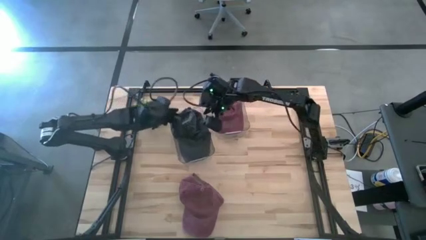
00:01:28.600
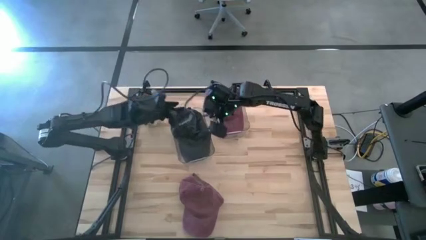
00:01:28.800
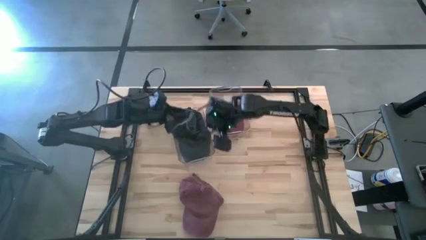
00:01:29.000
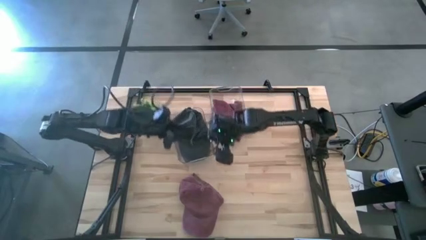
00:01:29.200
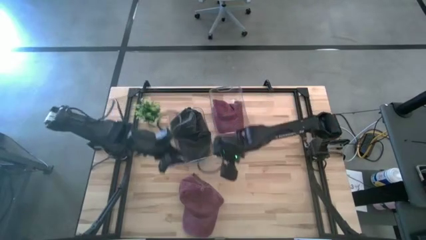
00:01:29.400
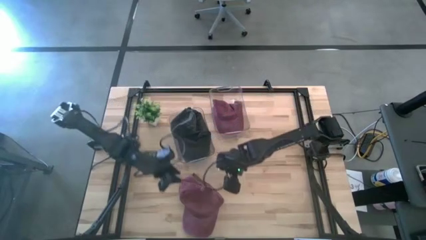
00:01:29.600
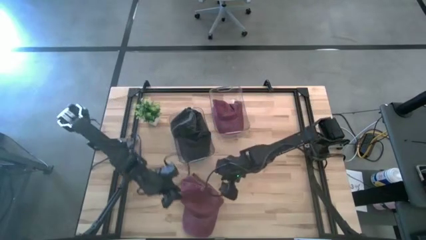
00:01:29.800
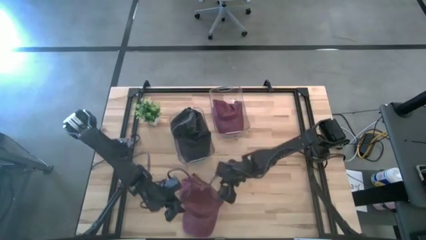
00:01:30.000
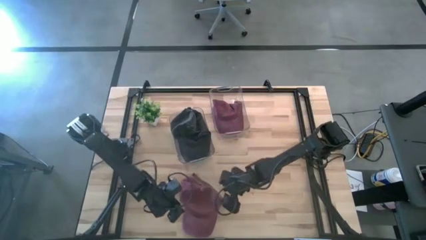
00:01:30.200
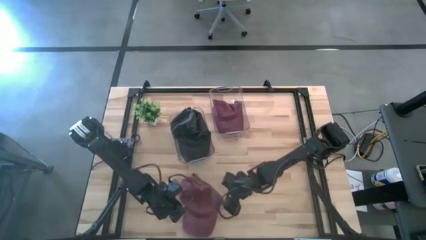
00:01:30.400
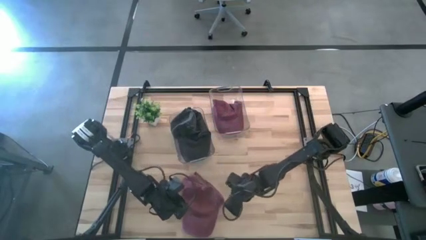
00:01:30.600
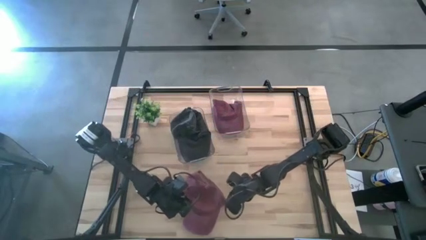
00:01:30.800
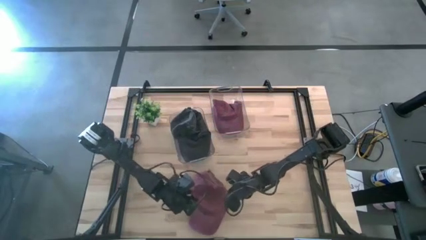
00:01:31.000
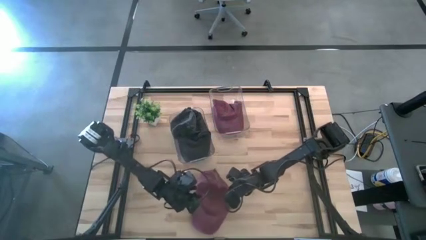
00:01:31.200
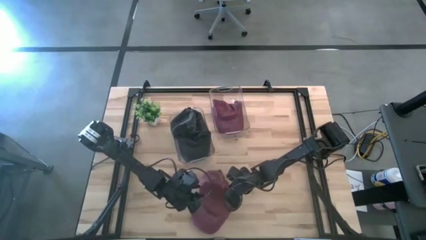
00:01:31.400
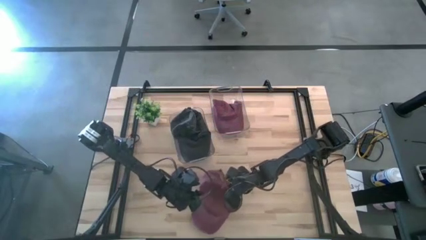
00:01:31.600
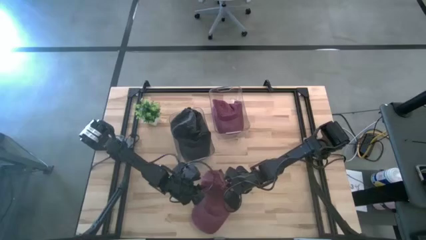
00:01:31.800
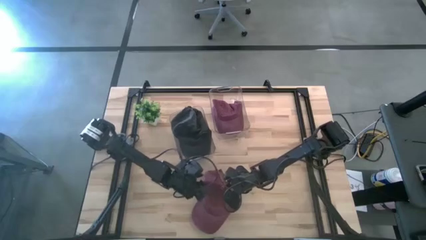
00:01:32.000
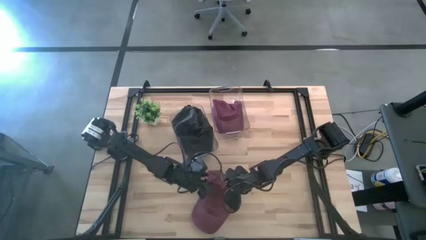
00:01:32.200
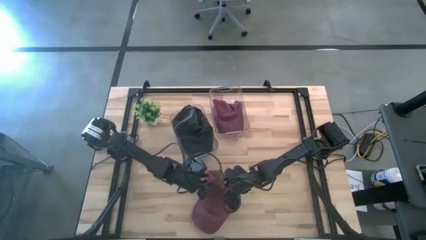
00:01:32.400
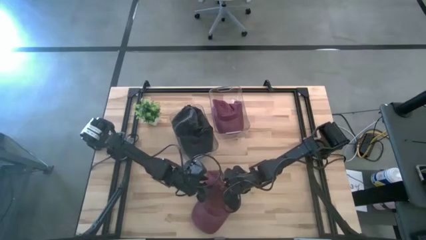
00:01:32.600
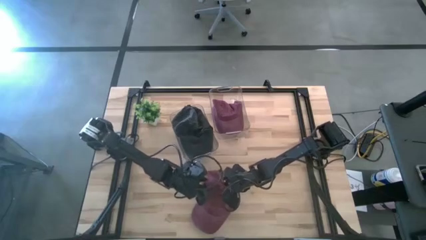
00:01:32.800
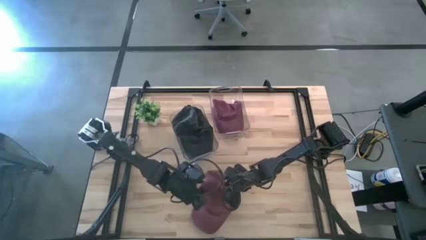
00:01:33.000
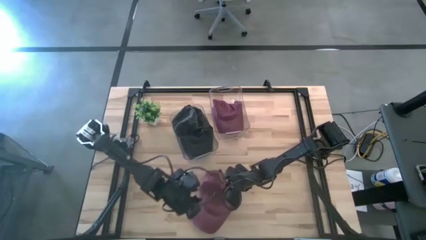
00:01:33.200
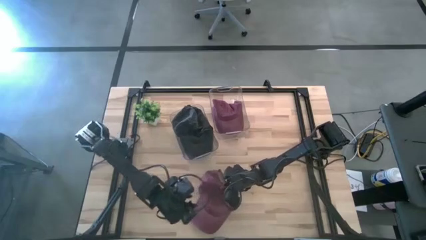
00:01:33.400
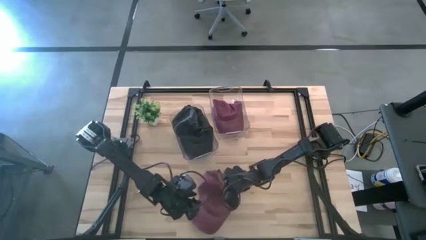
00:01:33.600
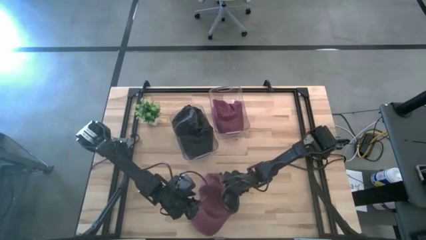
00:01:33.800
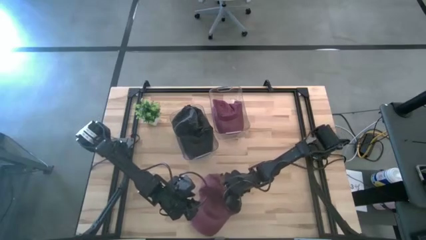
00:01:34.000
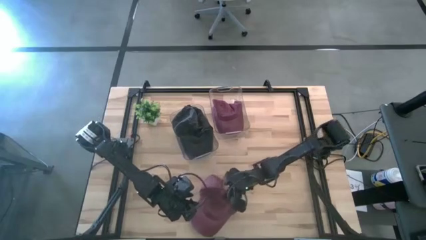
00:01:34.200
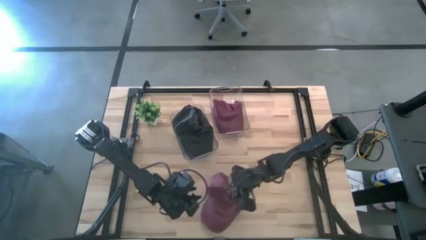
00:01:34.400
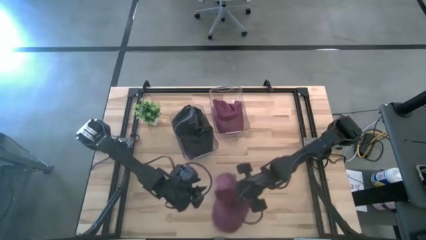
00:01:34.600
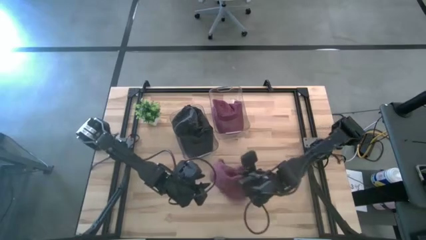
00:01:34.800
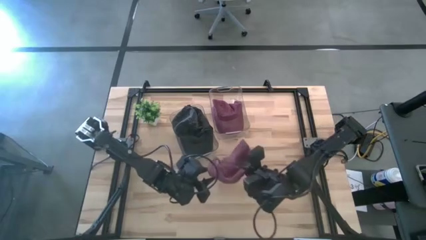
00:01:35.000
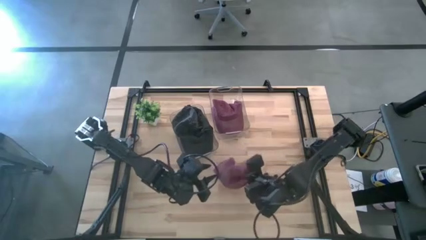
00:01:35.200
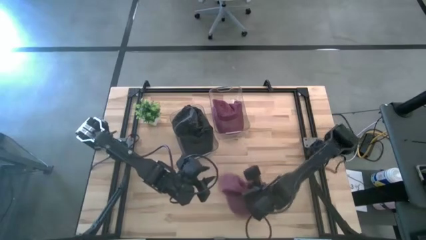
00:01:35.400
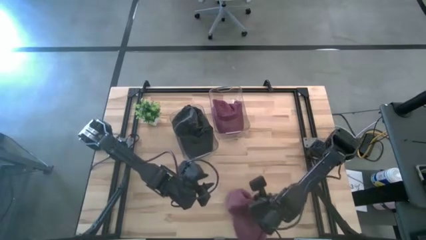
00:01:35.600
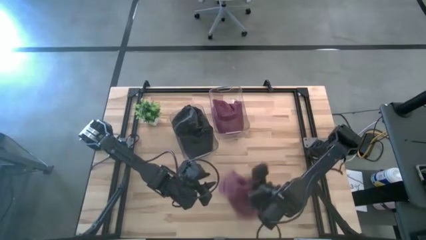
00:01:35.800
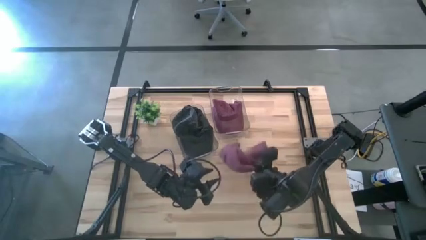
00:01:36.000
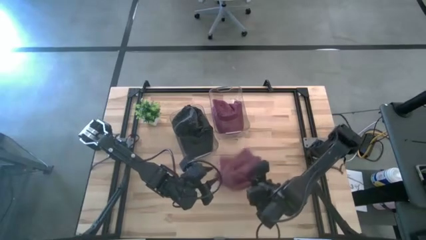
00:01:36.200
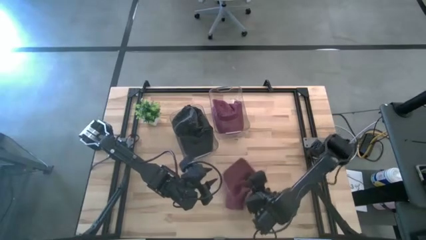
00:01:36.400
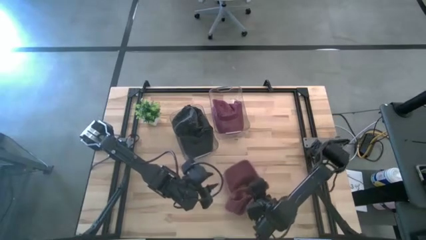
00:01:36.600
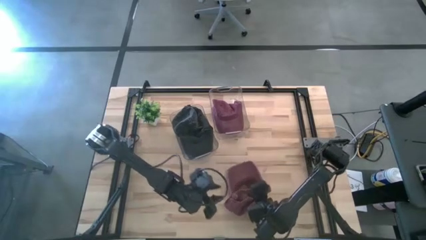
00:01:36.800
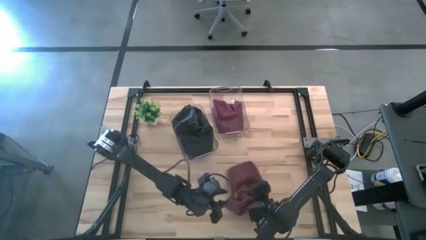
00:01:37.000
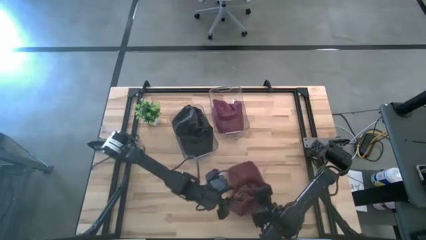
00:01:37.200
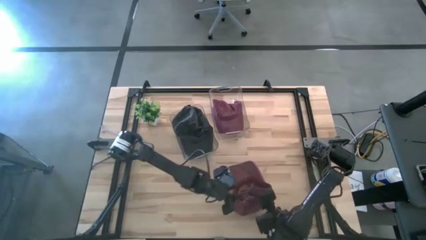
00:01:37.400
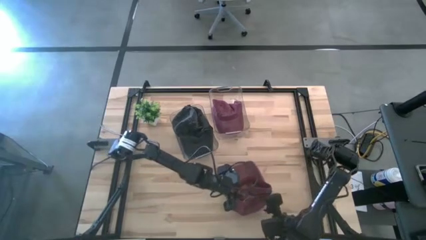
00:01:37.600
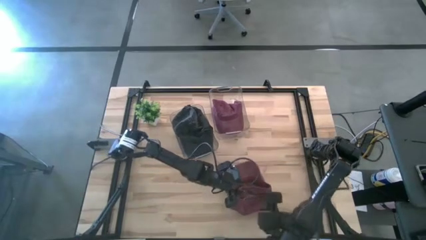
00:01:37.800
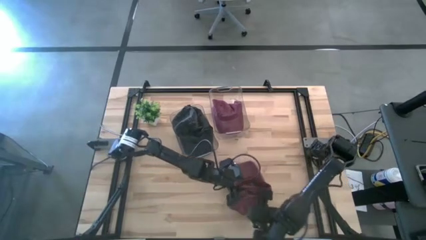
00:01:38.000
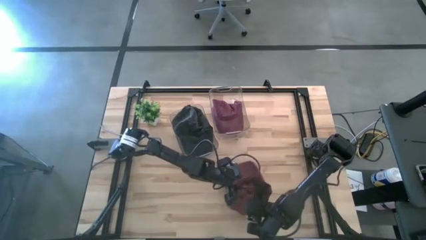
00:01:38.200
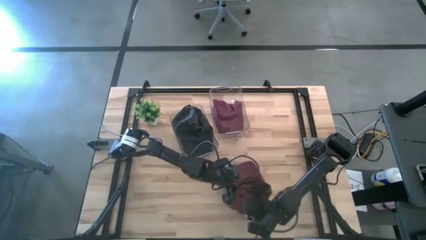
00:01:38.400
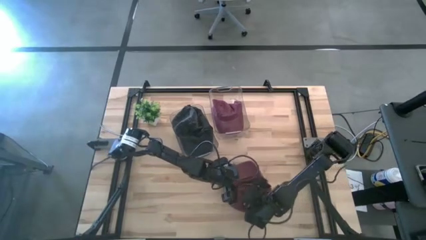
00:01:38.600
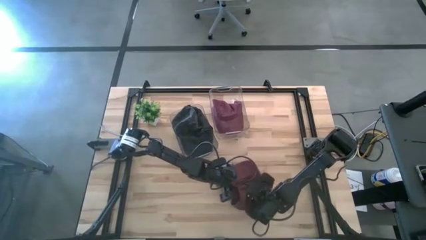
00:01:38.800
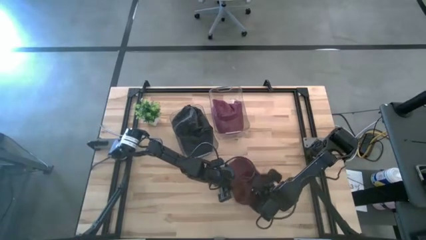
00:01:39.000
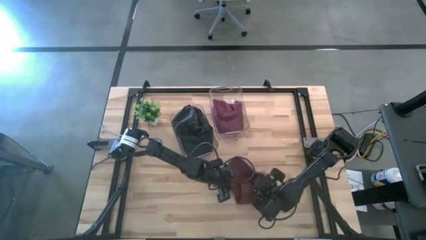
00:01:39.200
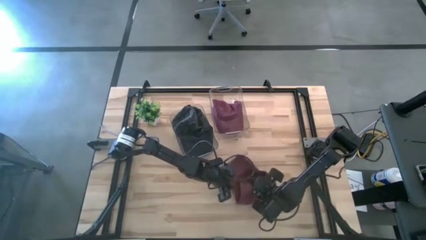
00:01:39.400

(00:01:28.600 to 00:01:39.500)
Task: Pick & Place hat
Put the red cap into the right transparent bin

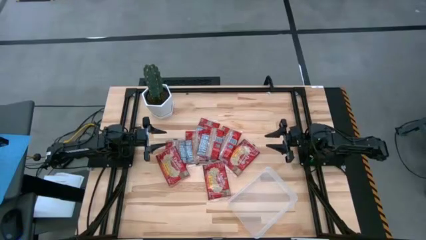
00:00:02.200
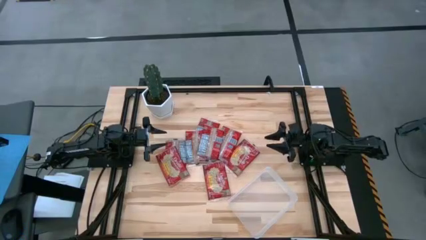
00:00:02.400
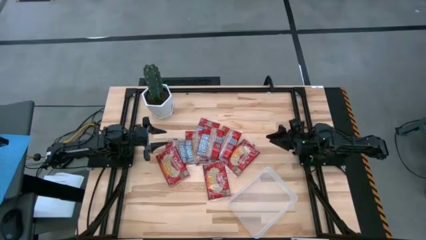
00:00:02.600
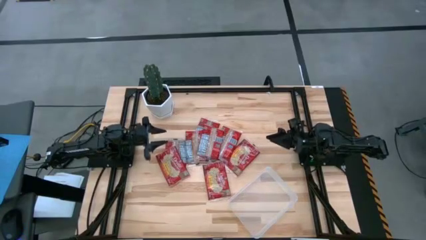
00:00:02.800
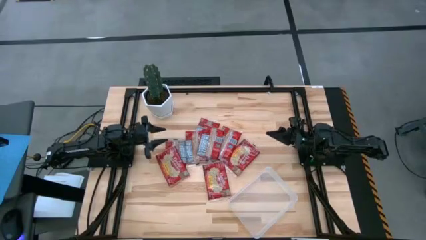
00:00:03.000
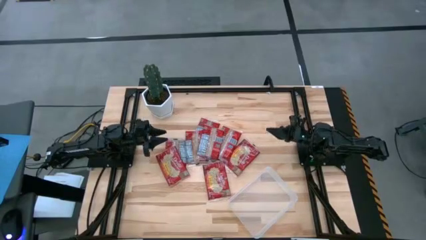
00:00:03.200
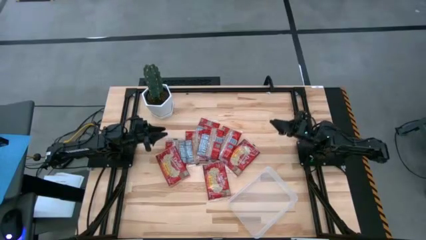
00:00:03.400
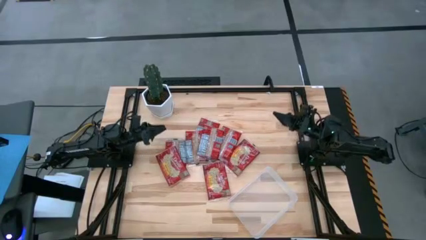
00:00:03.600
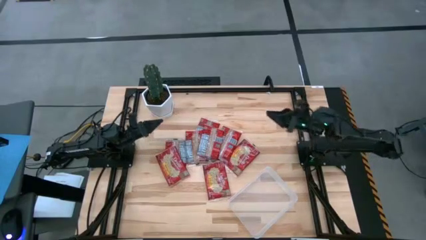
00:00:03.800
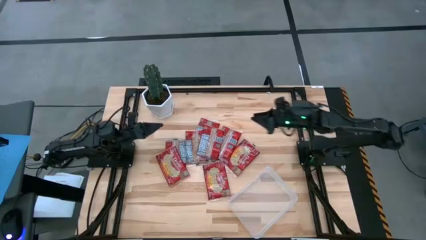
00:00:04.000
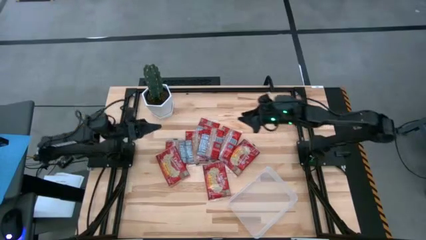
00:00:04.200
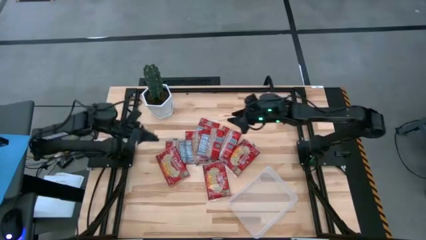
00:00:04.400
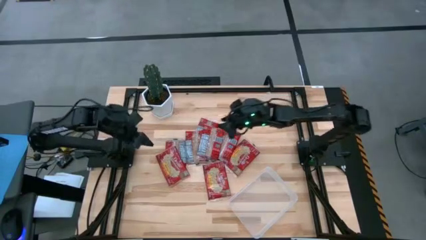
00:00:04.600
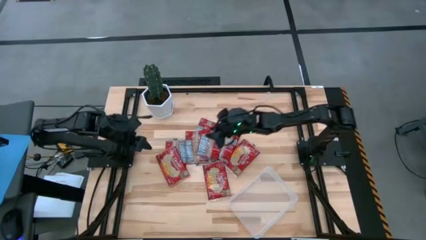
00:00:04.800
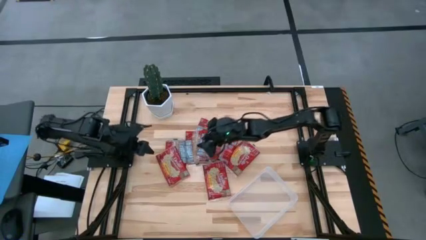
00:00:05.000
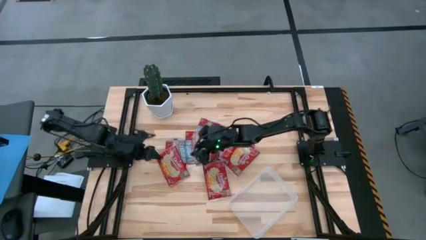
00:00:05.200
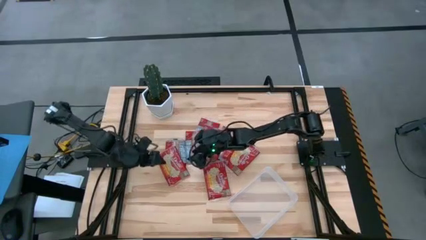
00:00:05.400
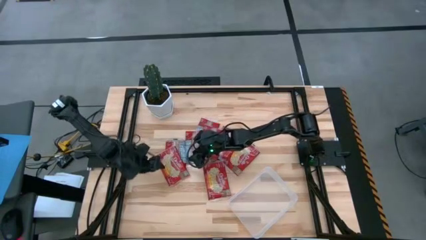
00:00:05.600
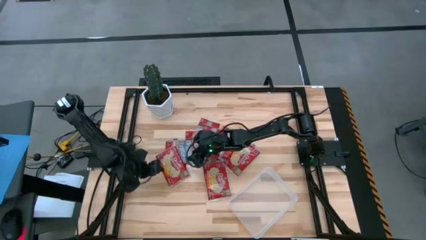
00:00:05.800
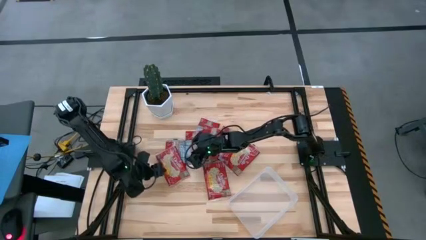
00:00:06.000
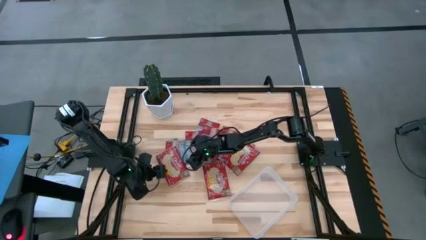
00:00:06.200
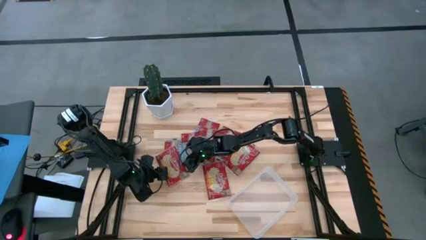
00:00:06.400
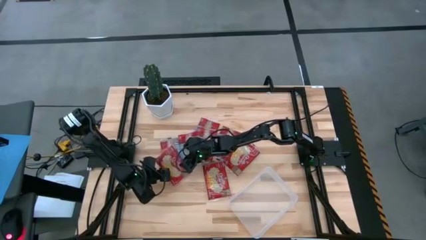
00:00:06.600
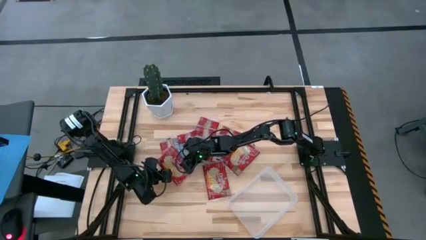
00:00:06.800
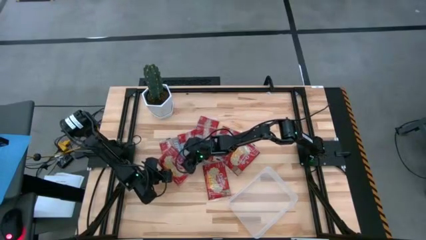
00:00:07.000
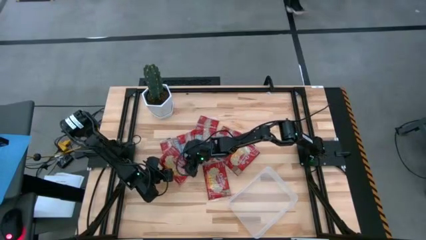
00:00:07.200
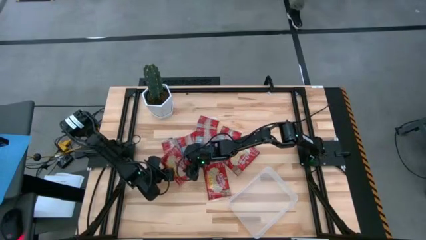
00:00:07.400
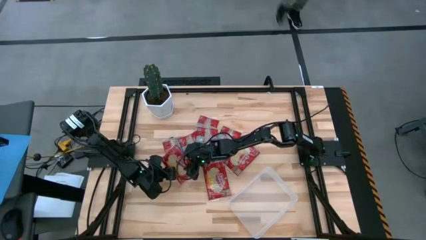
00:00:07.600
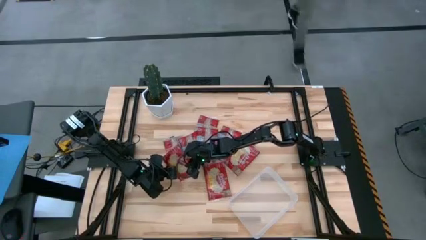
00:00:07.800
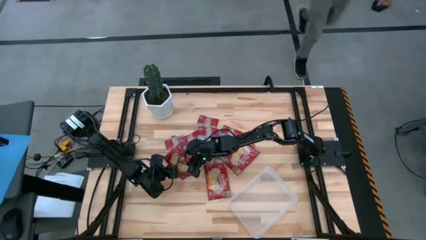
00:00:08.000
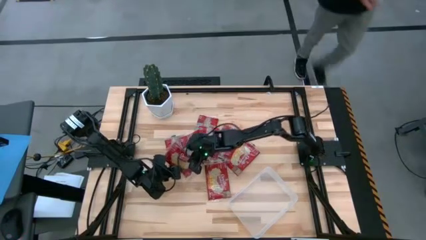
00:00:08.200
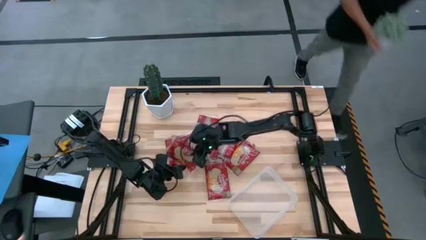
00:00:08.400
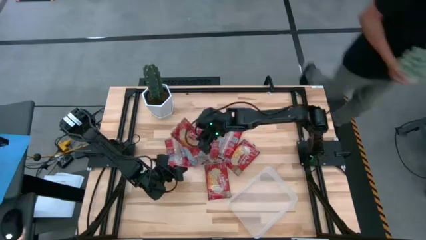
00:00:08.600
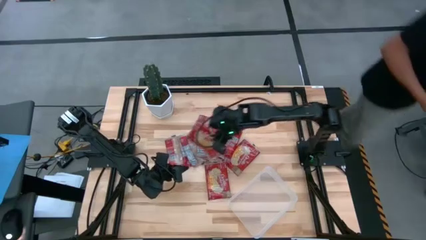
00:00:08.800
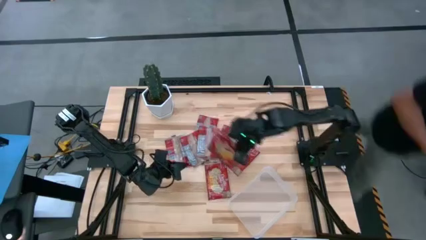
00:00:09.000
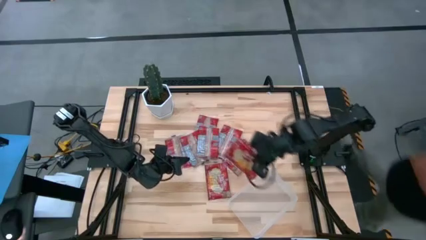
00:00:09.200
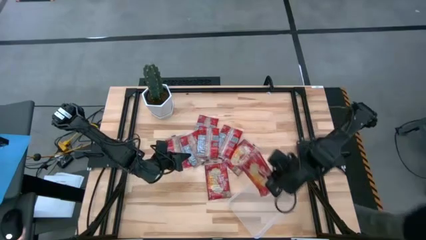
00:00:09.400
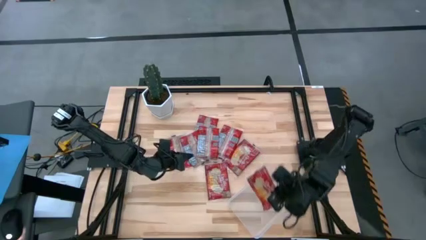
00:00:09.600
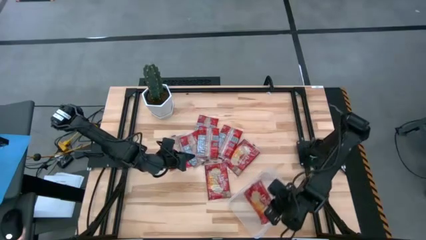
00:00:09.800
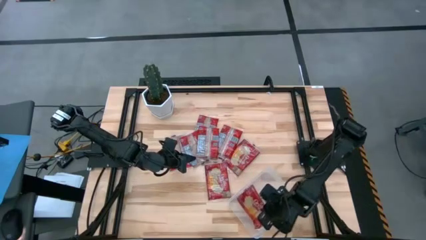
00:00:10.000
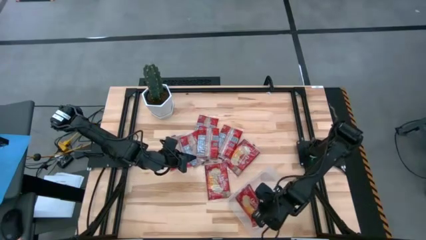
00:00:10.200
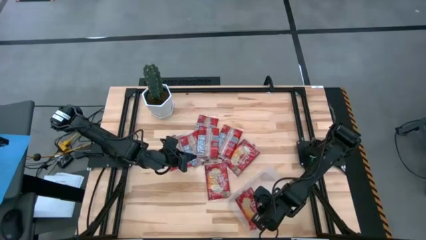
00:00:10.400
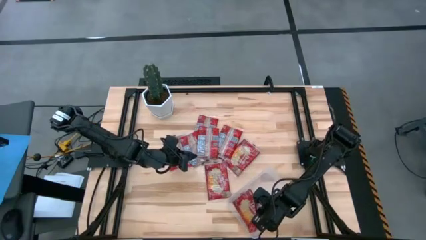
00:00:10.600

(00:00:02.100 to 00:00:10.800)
Task: Sort popcorn bags into baskets
Put the red popcorn bag into the transparent container
